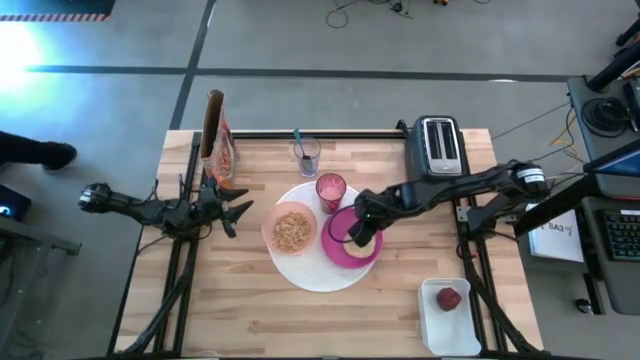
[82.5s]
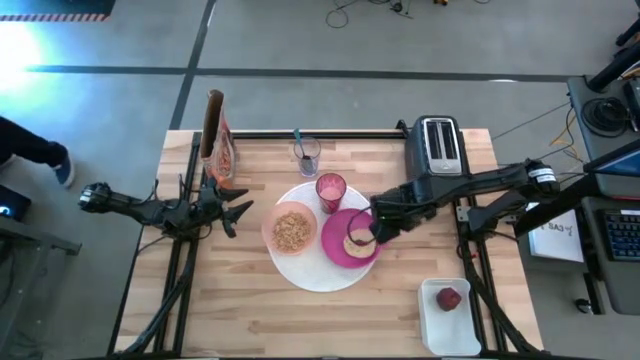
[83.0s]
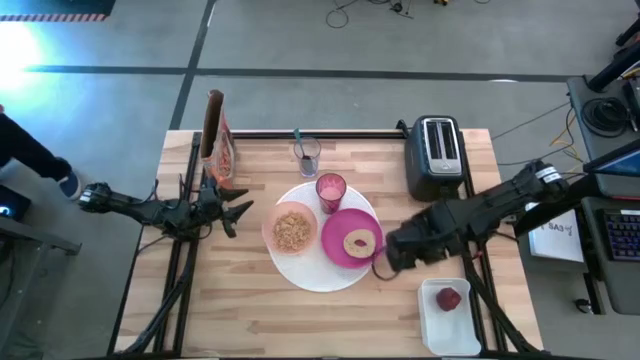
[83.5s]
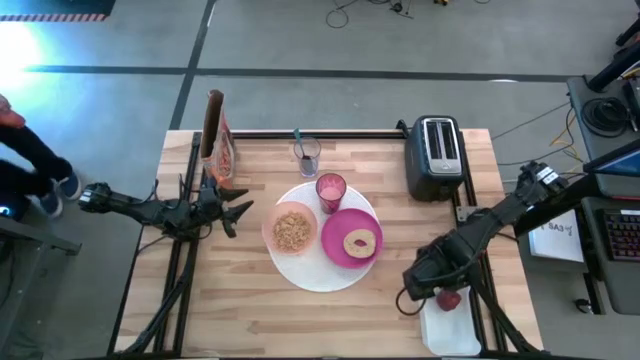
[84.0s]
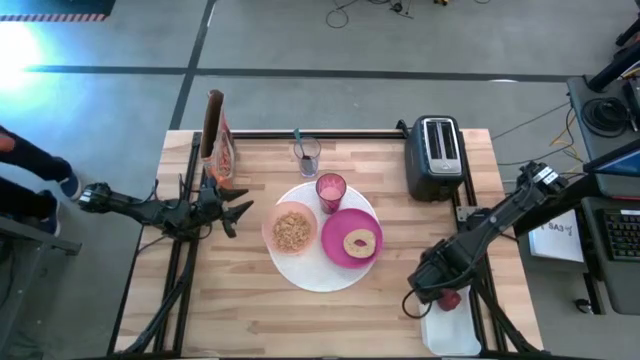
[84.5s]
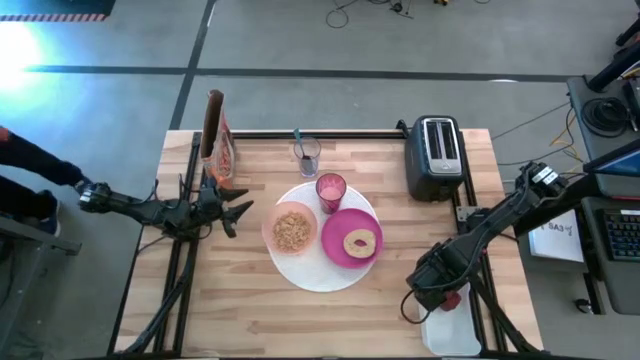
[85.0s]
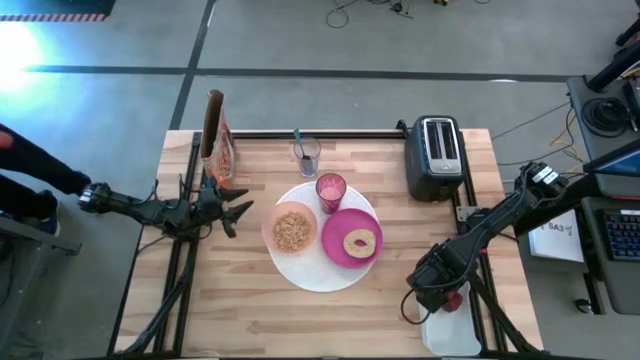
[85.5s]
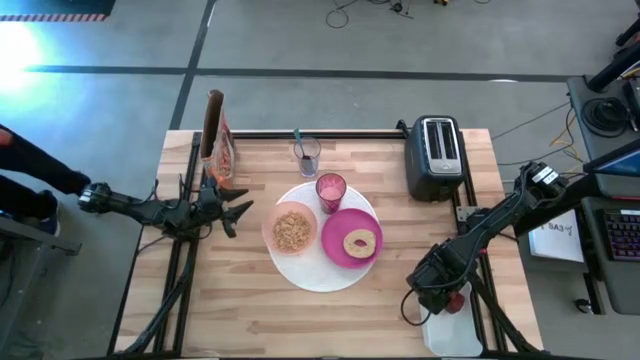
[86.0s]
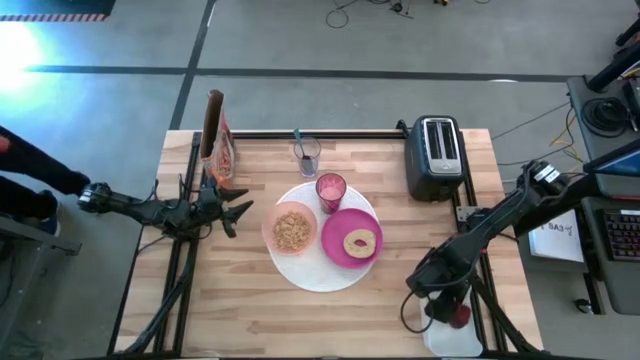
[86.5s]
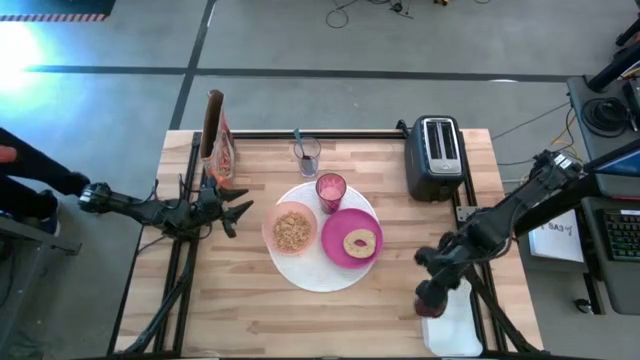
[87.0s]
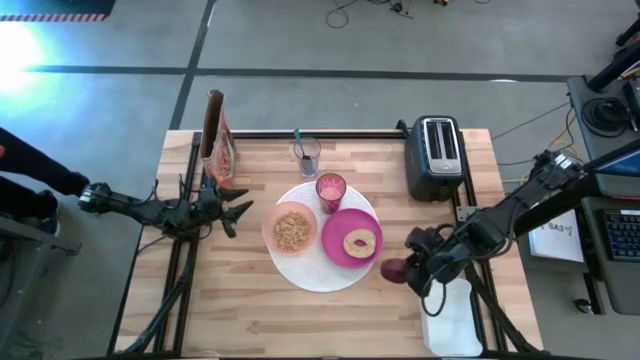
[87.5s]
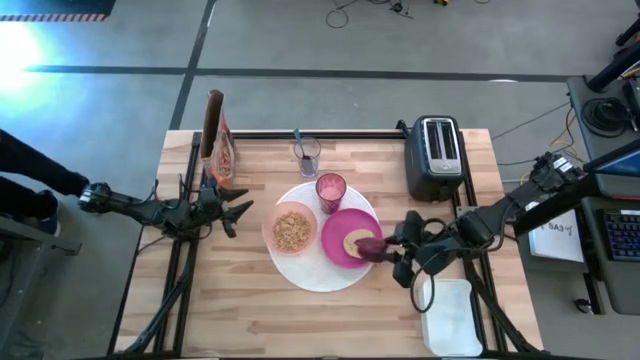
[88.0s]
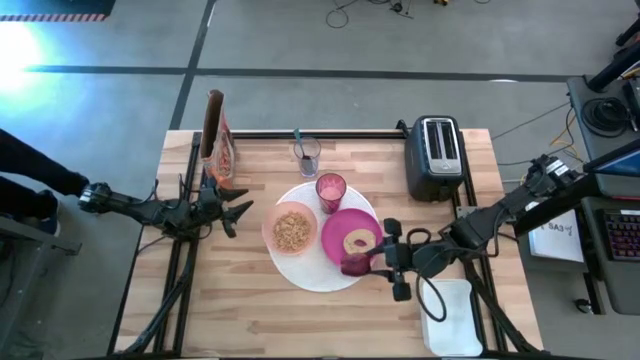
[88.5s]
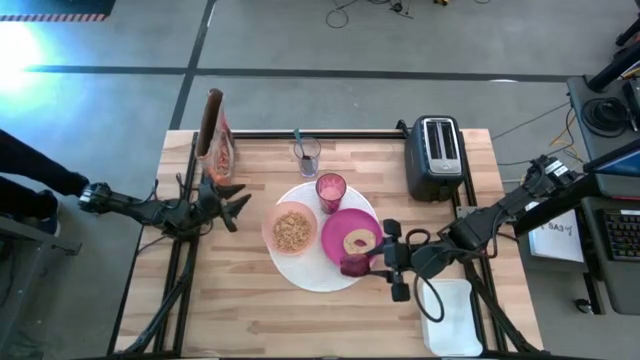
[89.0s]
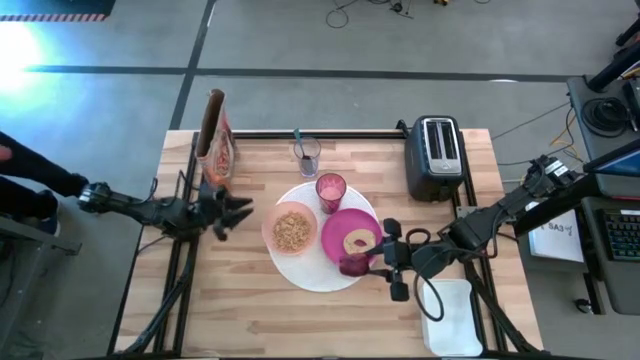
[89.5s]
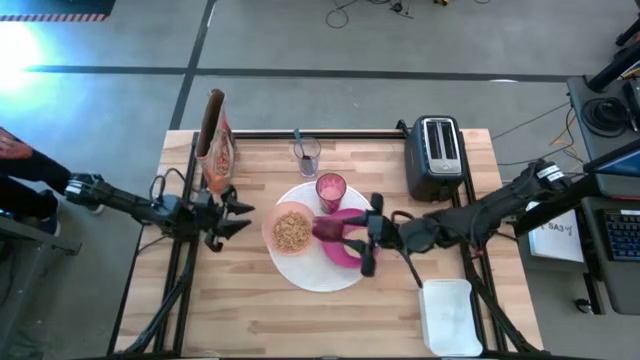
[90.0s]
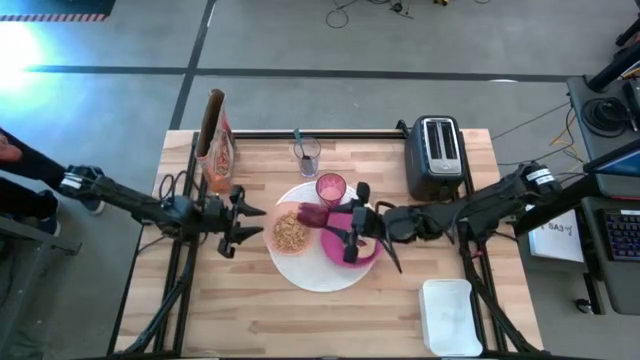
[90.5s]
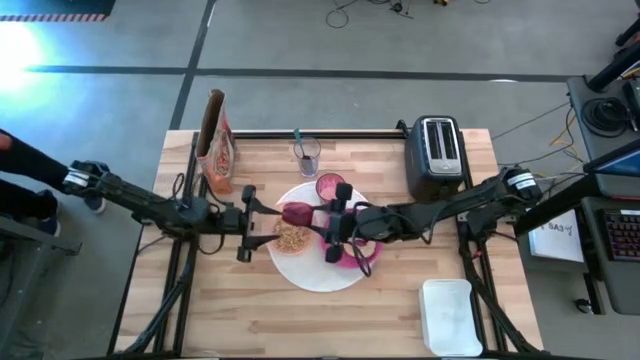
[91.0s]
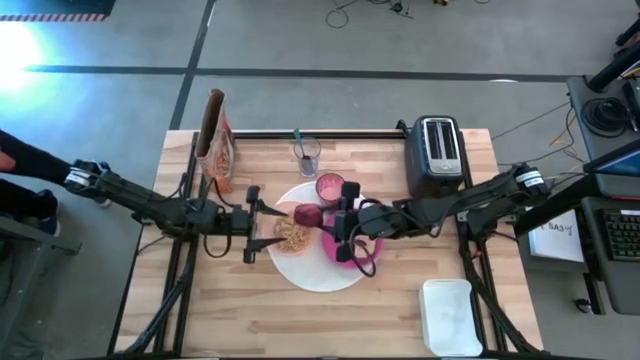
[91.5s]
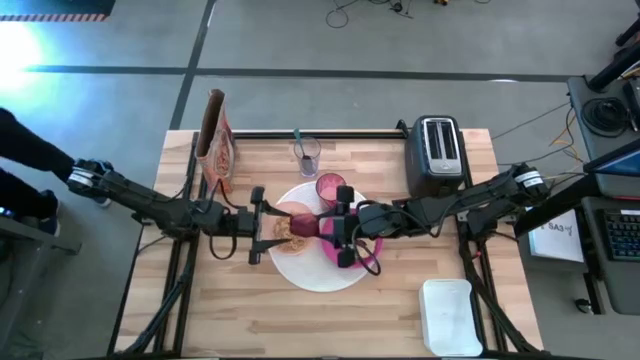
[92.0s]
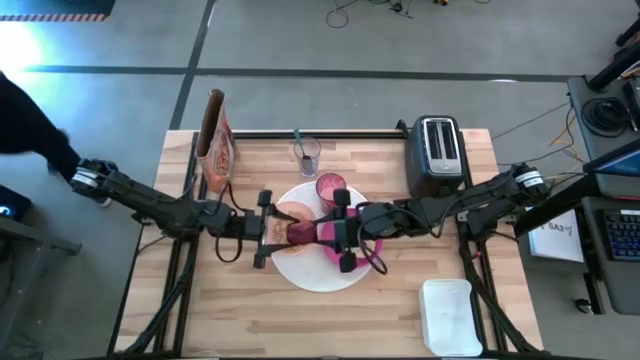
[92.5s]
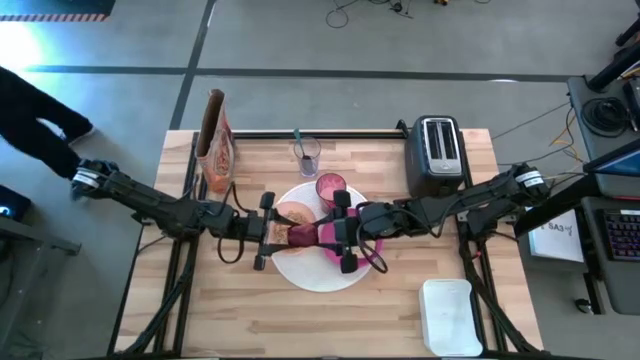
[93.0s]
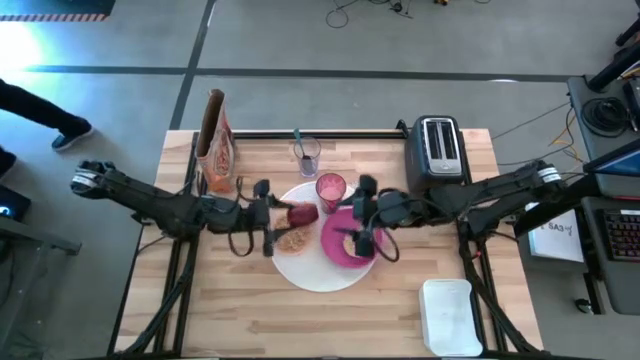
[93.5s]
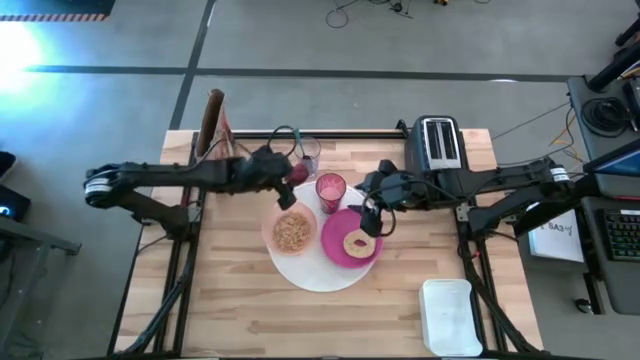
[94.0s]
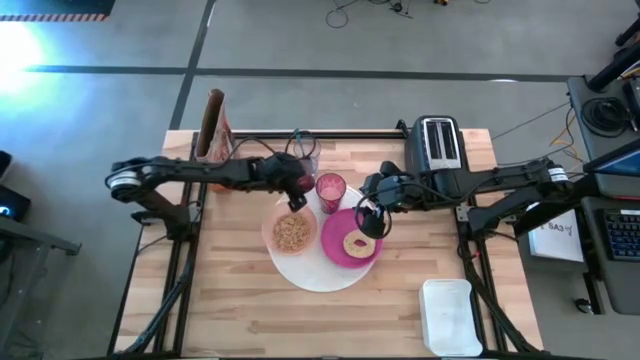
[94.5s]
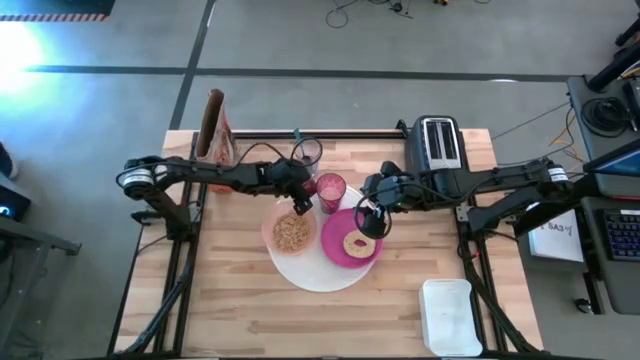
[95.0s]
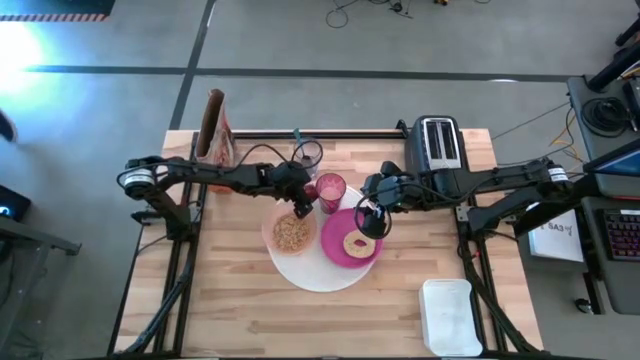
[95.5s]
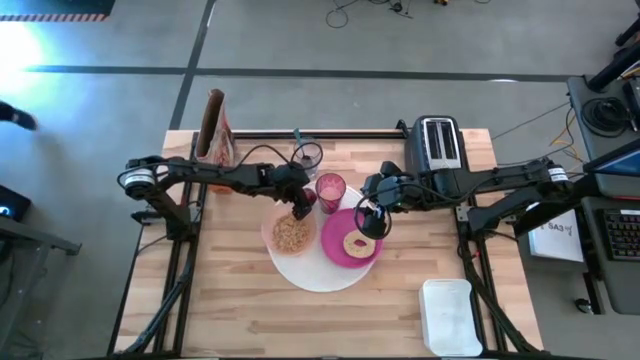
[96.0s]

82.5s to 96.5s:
Task: Arrange a breakfast setting
Put the red apple on the white table mat to the left of the cup of milk

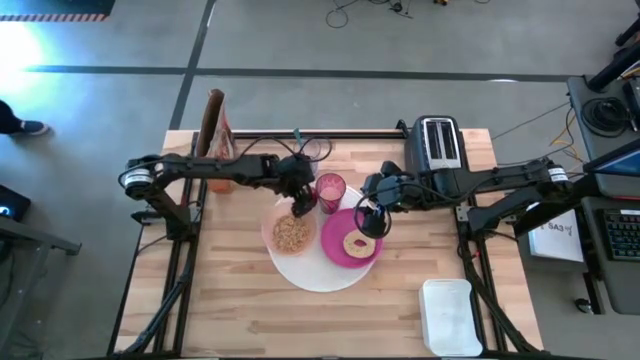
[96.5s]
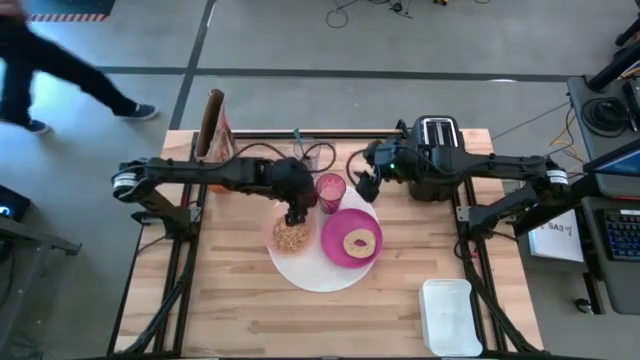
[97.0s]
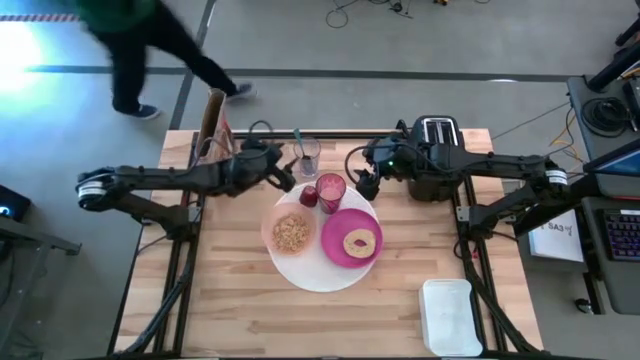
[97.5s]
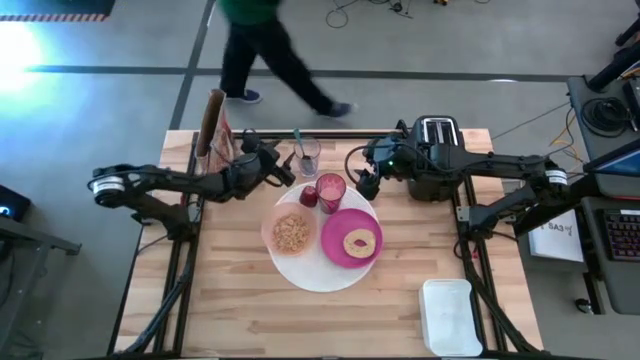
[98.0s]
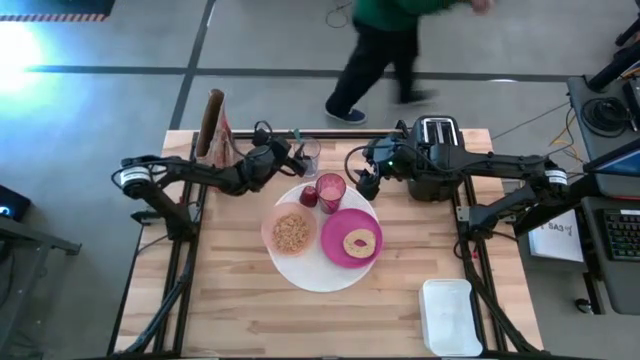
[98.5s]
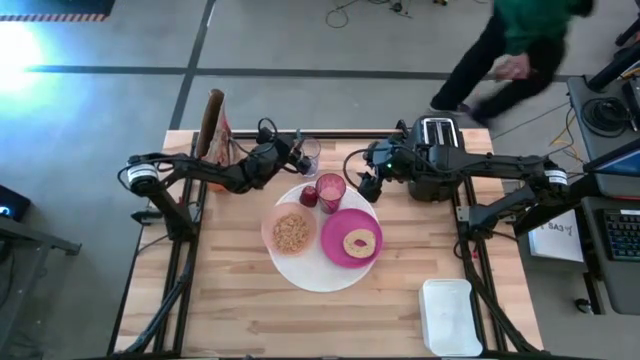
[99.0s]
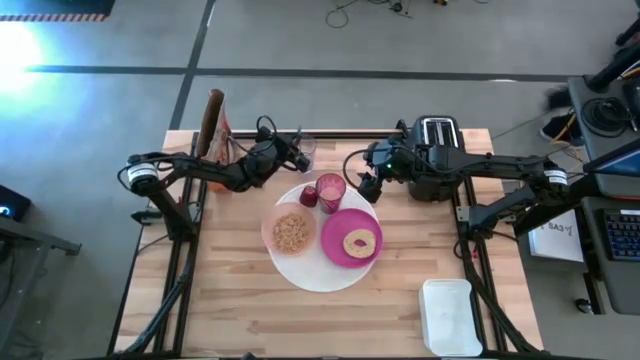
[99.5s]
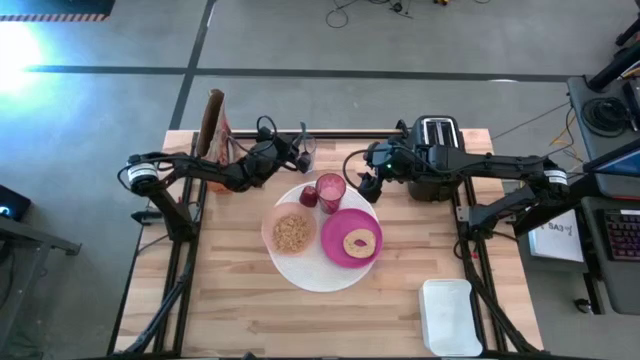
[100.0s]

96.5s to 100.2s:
Put the blue spoon beside the orange bowl

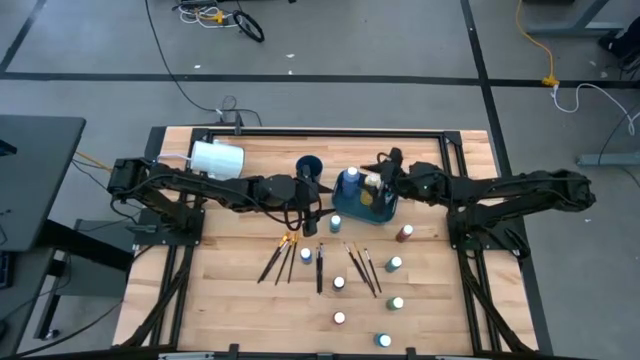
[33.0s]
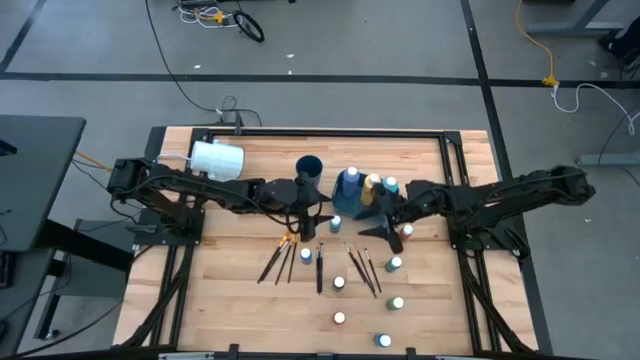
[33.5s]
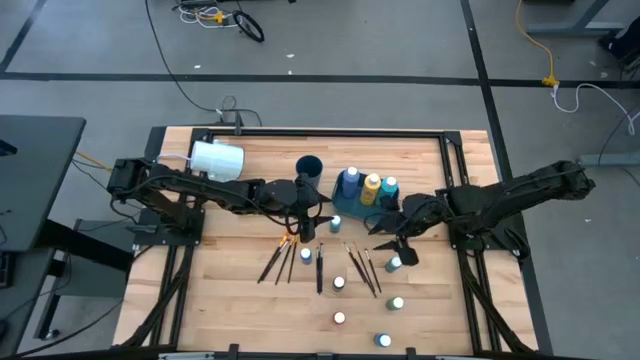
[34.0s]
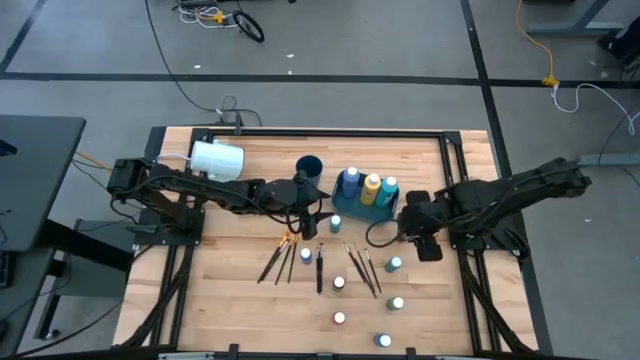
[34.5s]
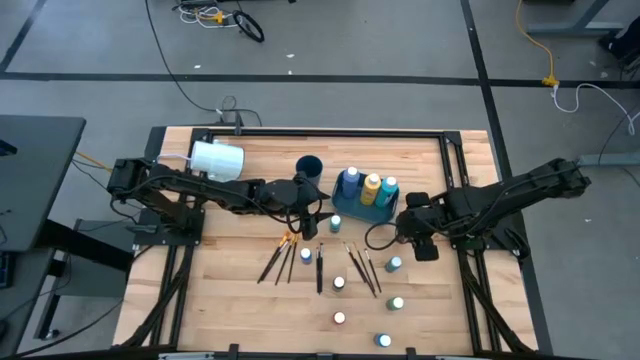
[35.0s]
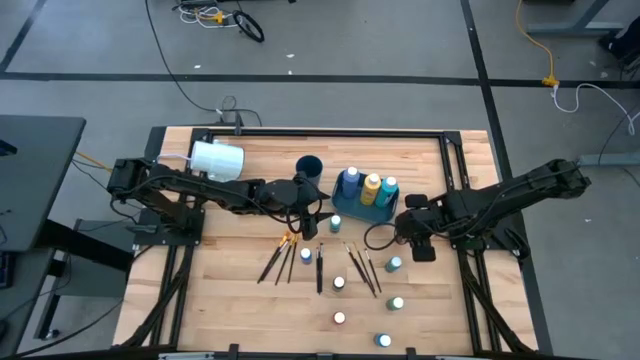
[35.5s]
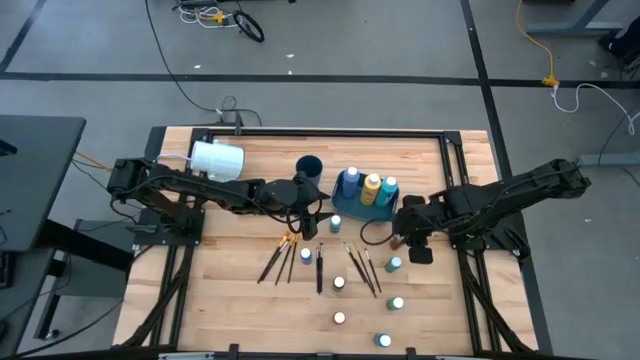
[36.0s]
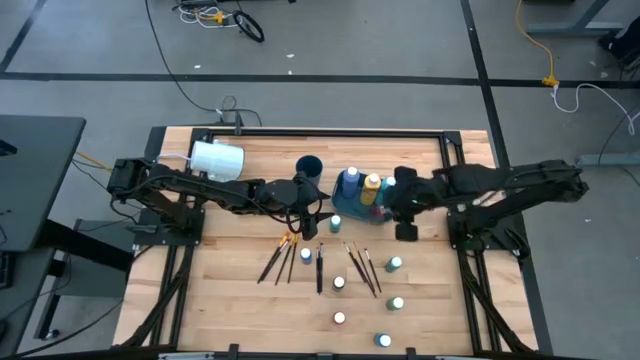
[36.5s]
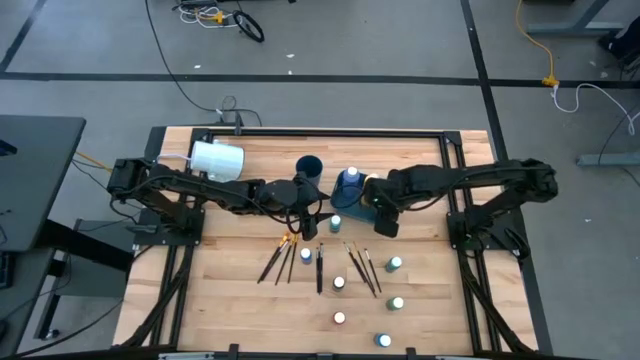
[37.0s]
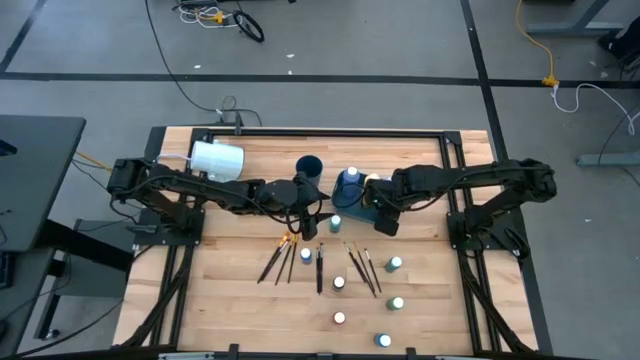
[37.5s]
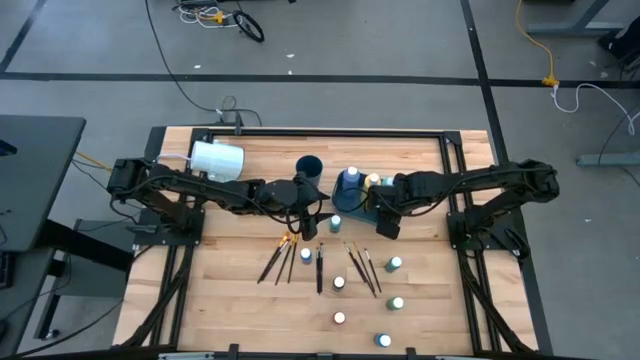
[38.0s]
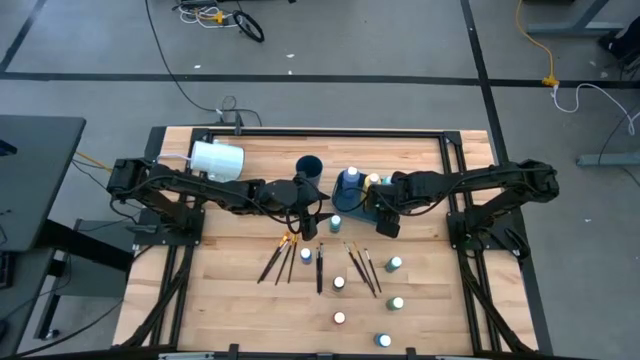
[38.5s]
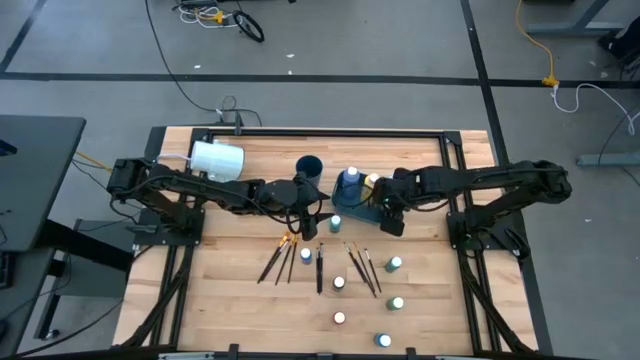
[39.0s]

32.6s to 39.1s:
Task: Pick & Place Paint Supplies
Put the small red paint bottle into the blue bin
